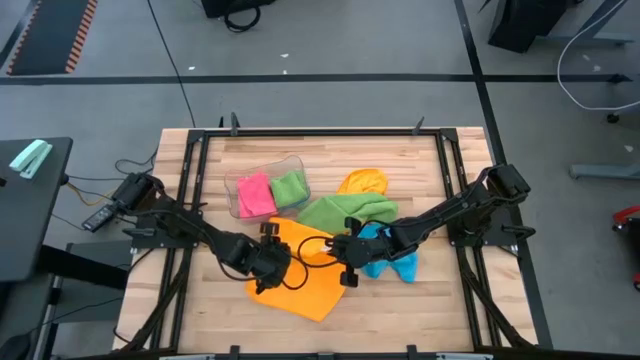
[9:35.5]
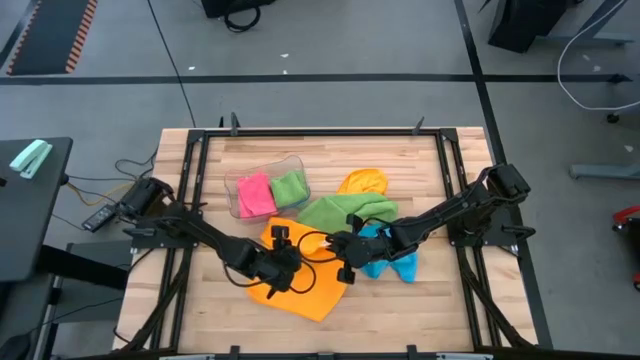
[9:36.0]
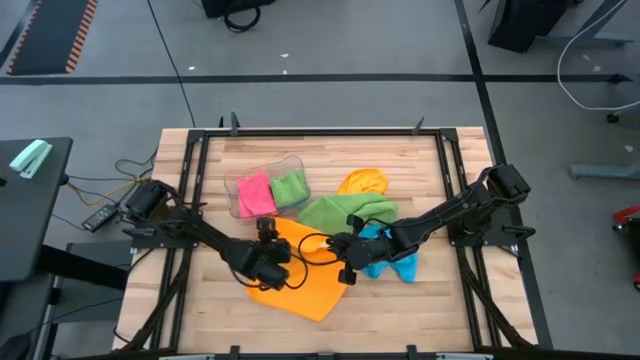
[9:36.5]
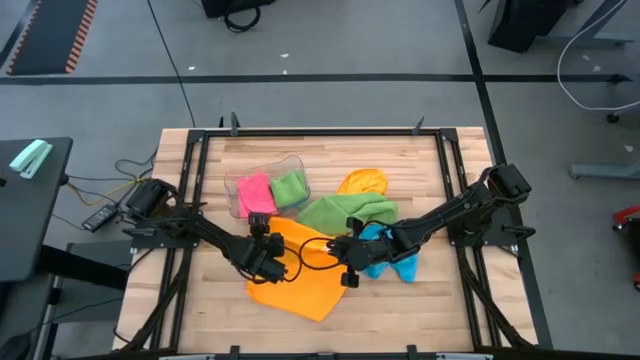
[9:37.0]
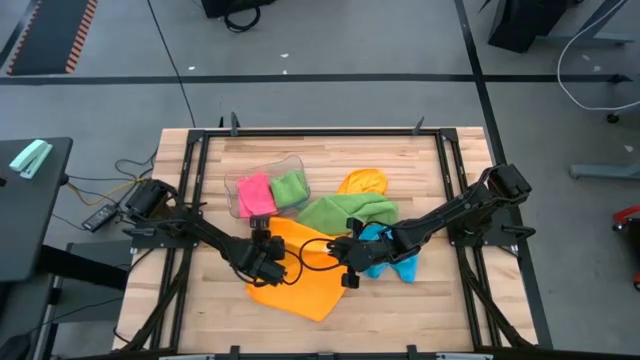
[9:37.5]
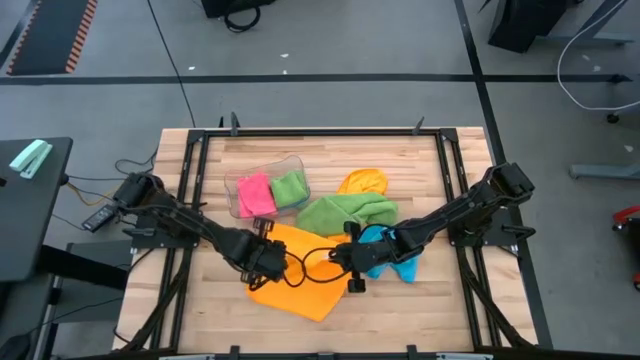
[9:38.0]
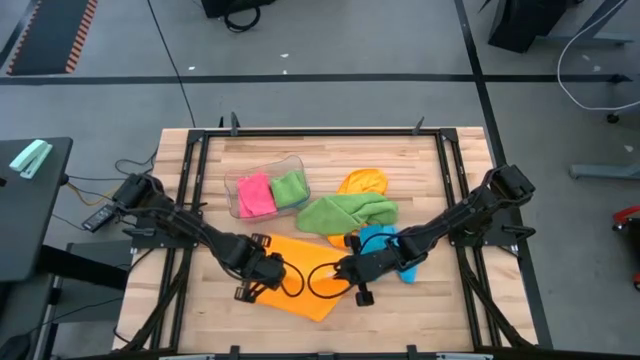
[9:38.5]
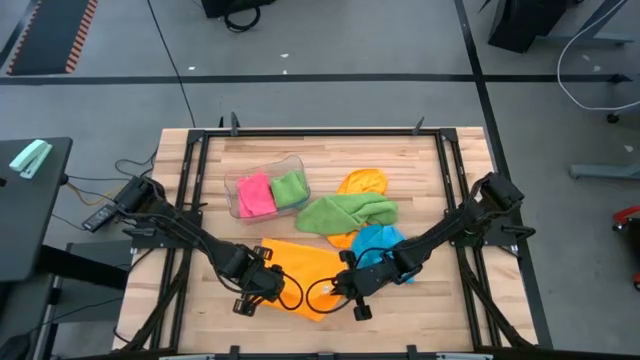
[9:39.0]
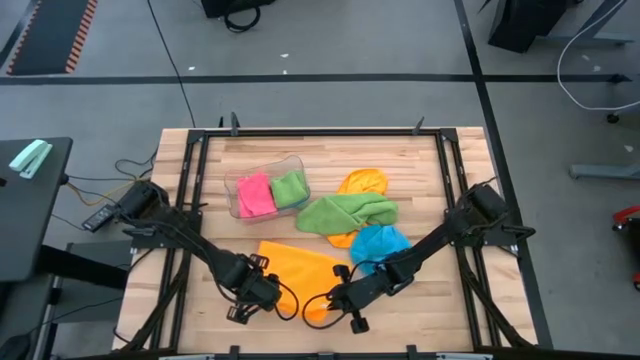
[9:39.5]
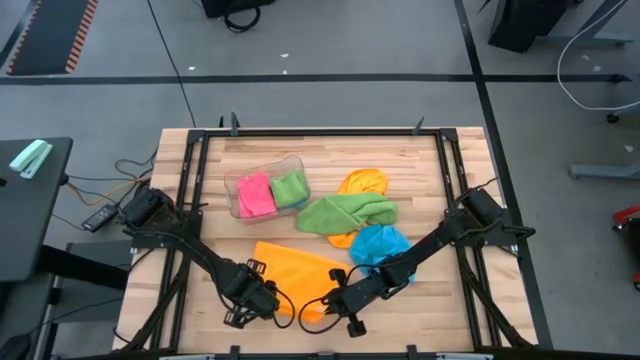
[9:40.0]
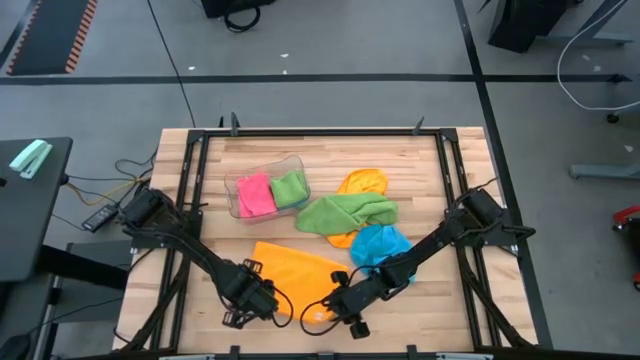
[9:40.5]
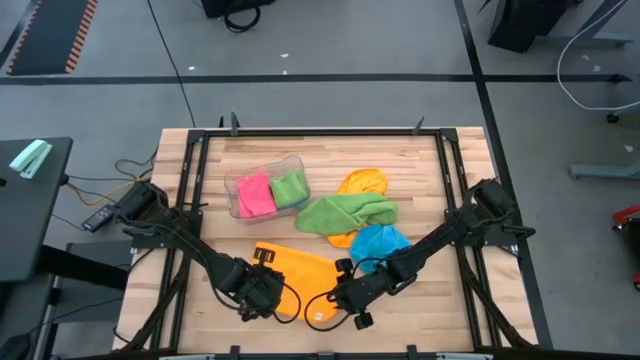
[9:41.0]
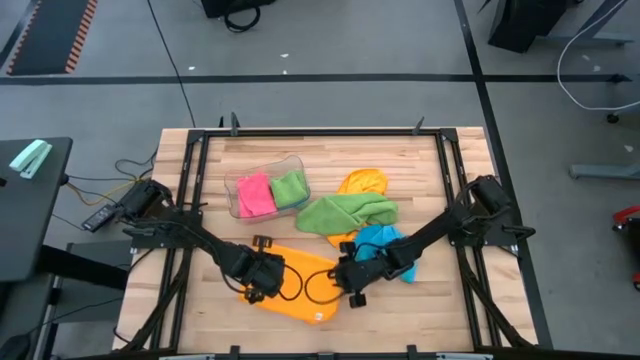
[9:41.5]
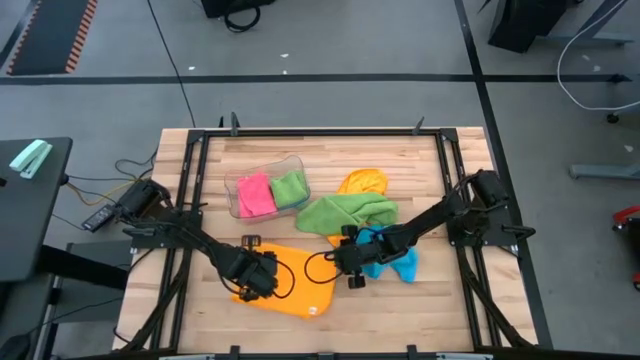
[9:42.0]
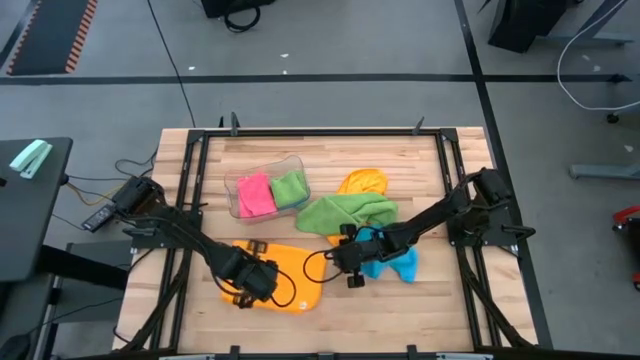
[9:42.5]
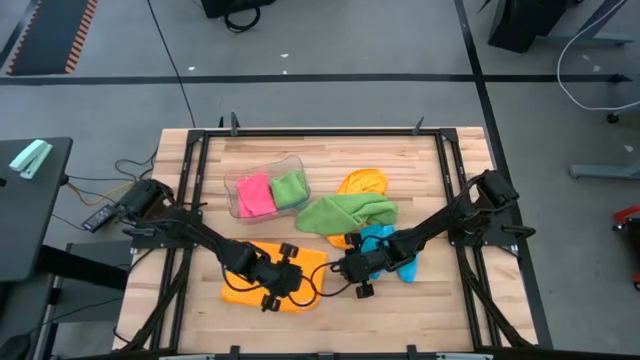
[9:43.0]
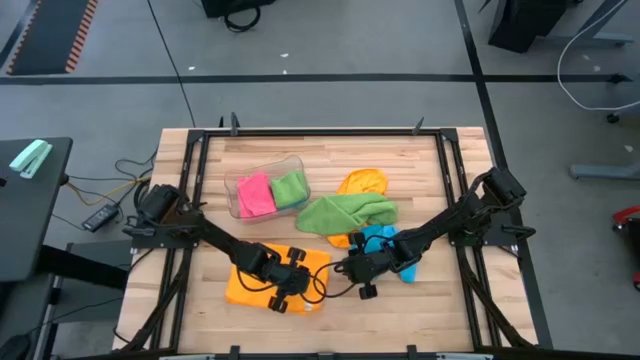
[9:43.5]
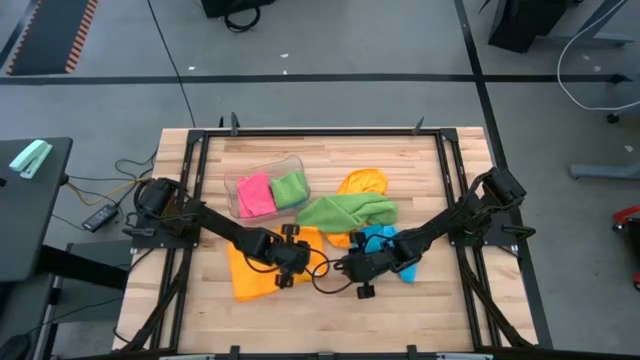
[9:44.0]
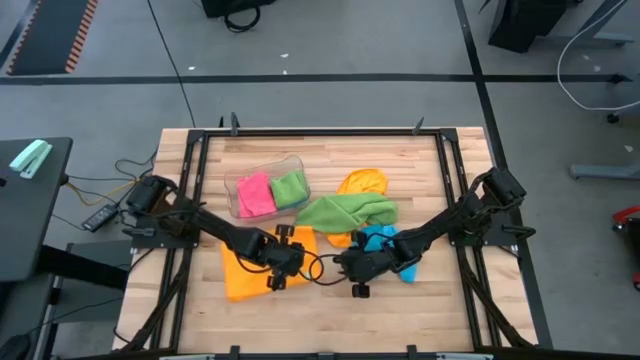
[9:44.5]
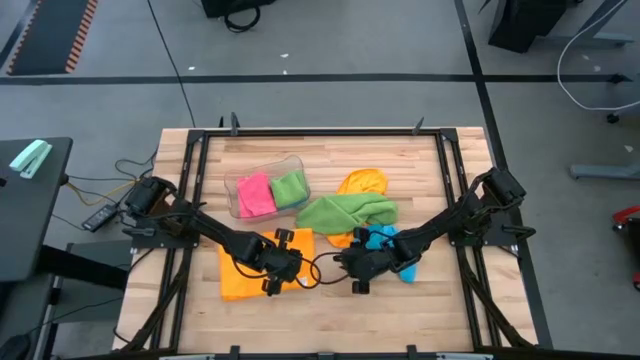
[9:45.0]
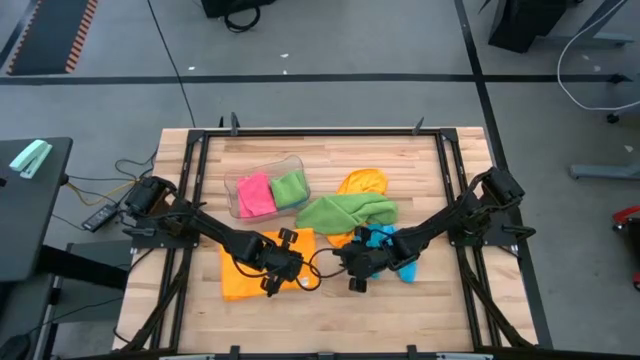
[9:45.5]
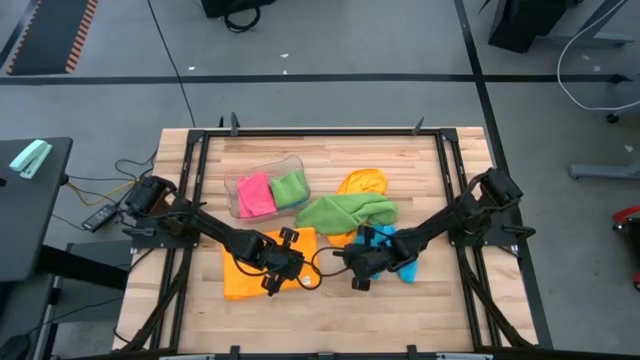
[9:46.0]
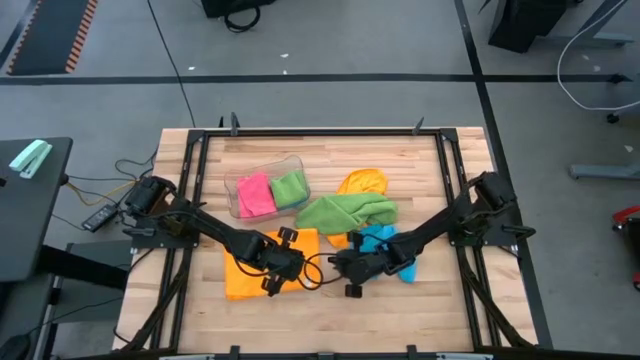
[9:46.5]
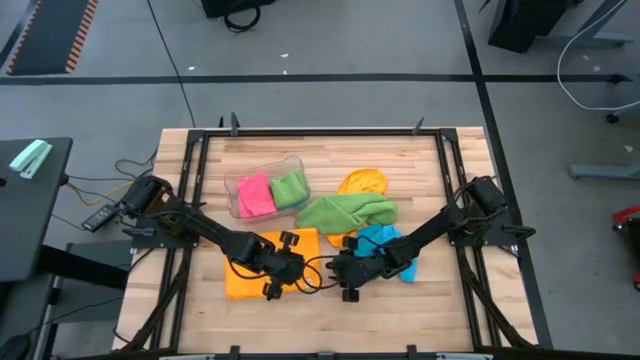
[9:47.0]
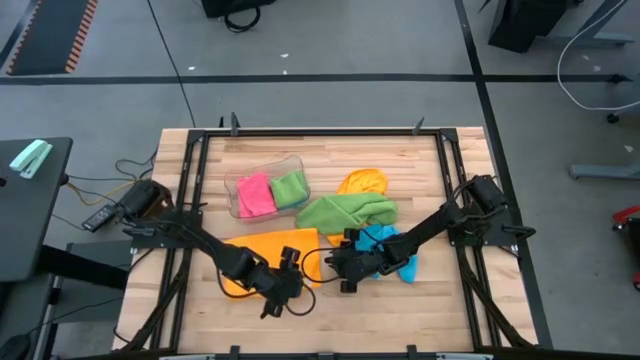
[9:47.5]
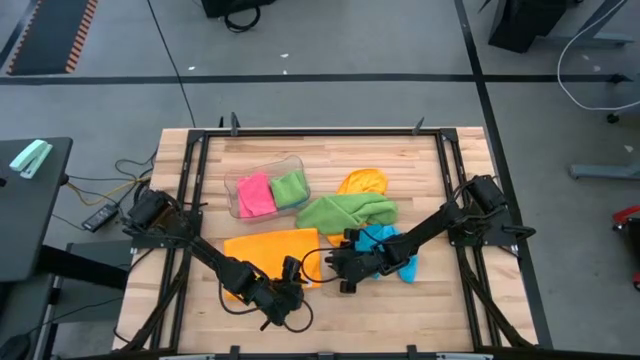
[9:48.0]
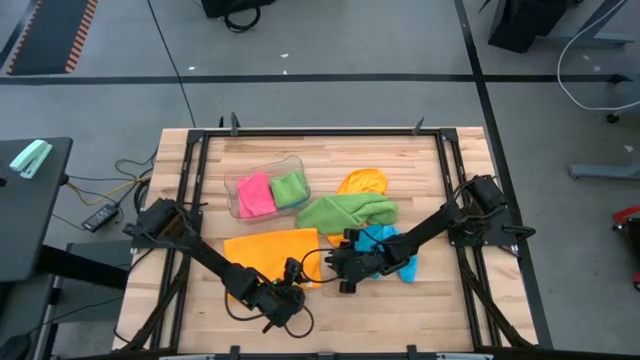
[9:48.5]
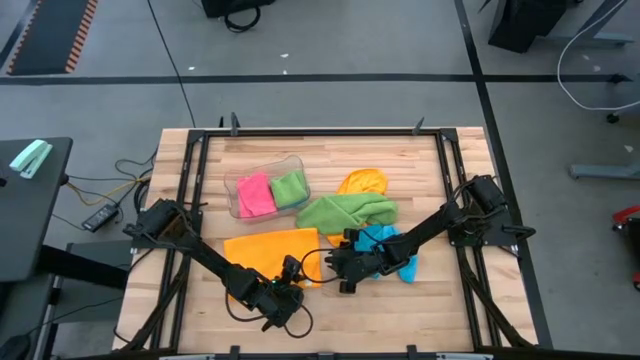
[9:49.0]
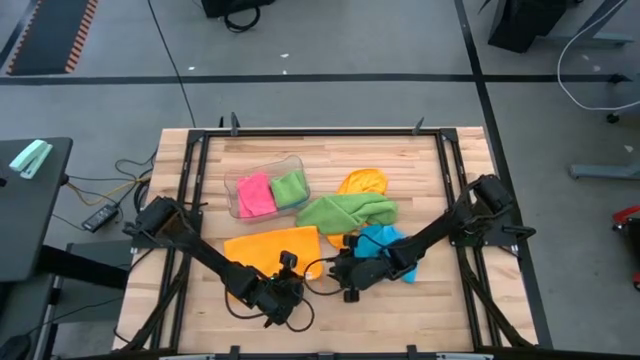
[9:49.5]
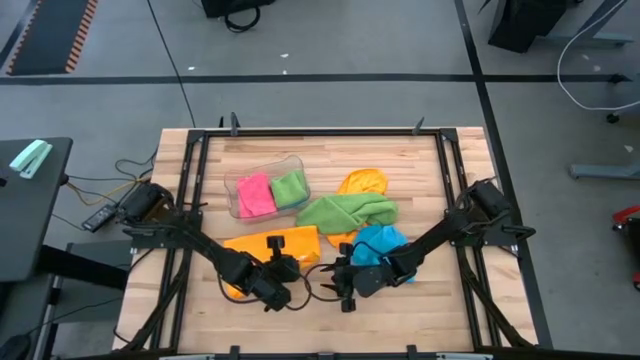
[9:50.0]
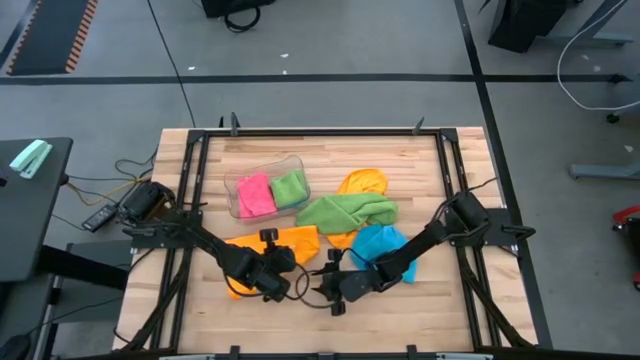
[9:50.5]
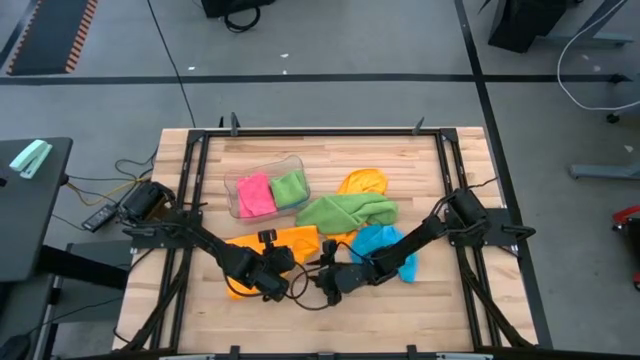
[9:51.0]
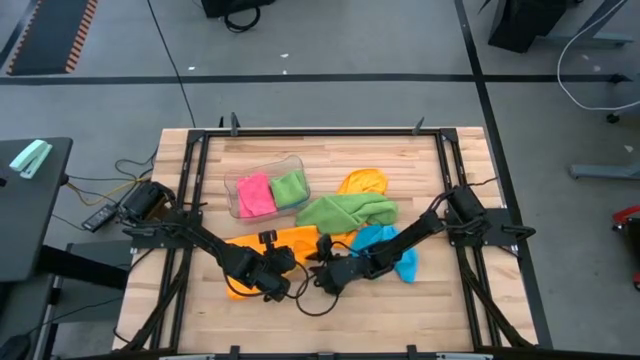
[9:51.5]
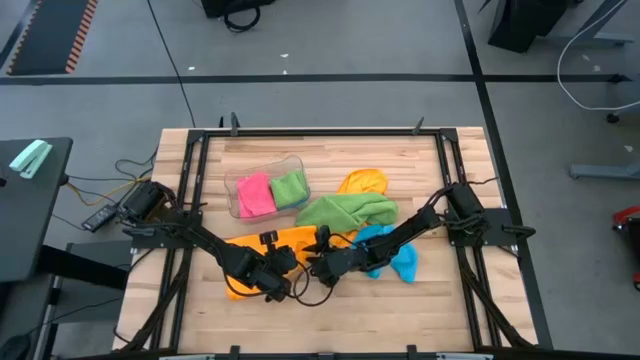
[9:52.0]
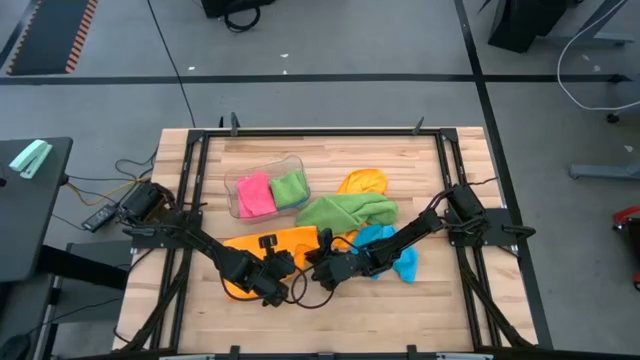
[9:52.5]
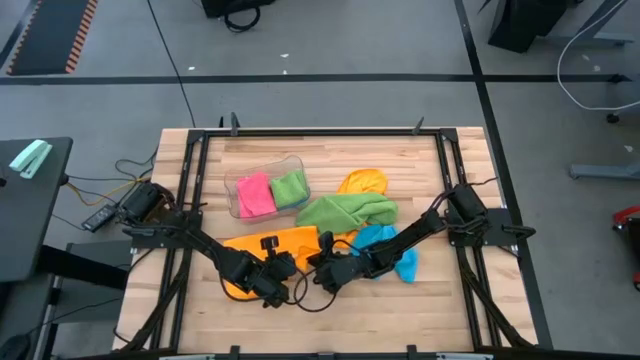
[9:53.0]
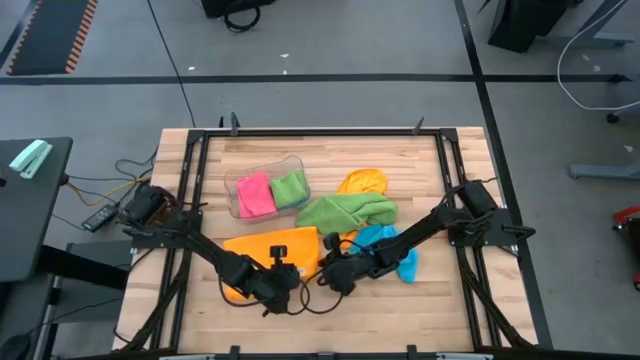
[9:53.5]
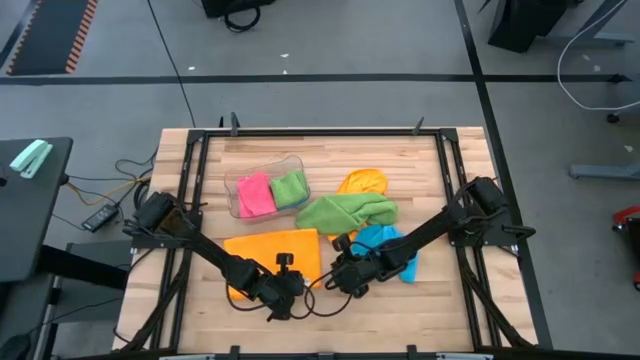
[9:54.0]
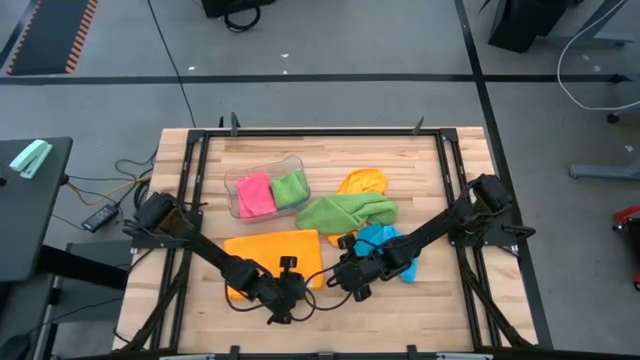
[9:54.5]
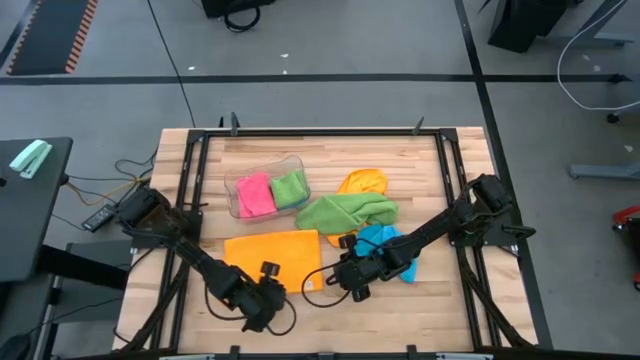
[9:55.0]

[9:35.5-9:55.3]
Task: Fold microfiber towels
Fold the bottom yellow microfiber towel
